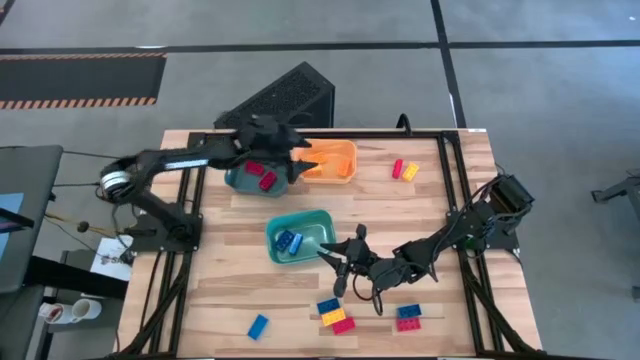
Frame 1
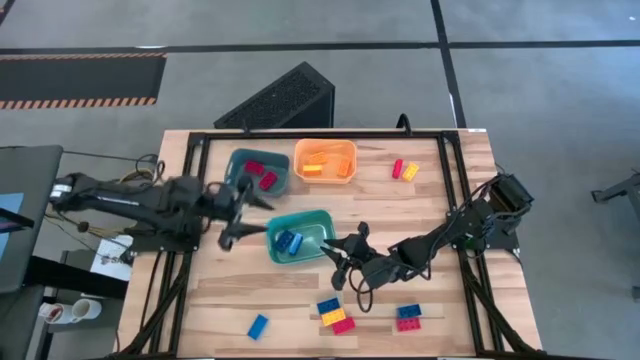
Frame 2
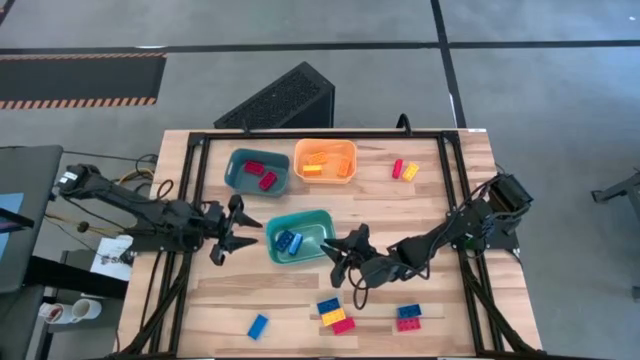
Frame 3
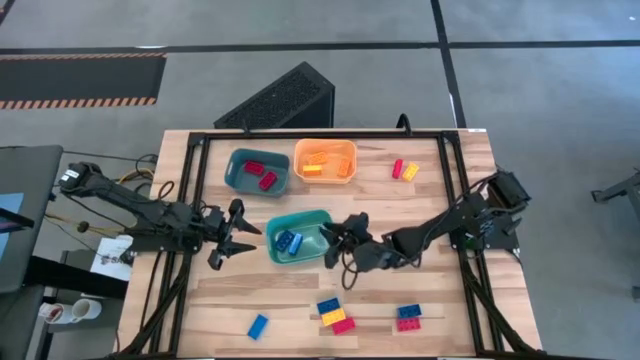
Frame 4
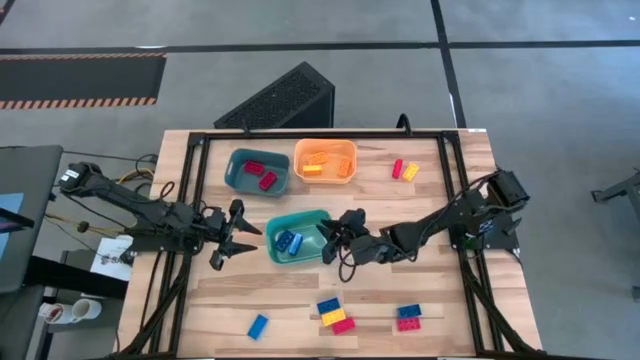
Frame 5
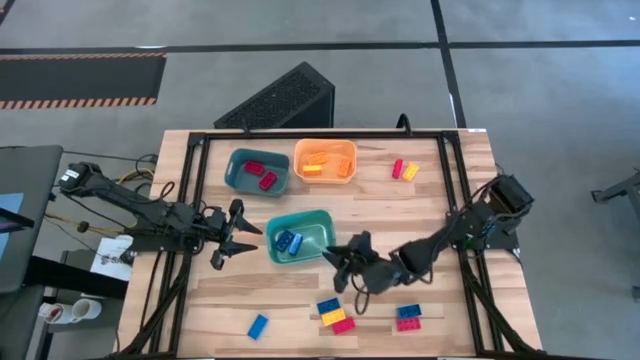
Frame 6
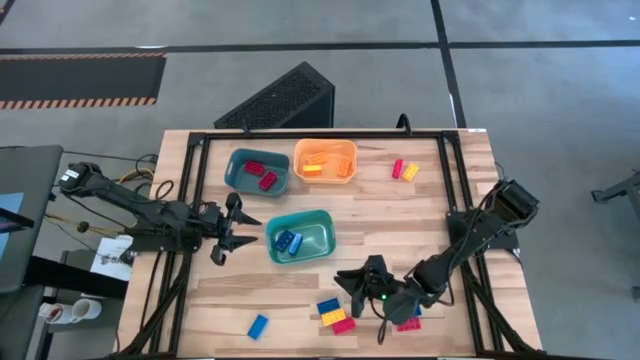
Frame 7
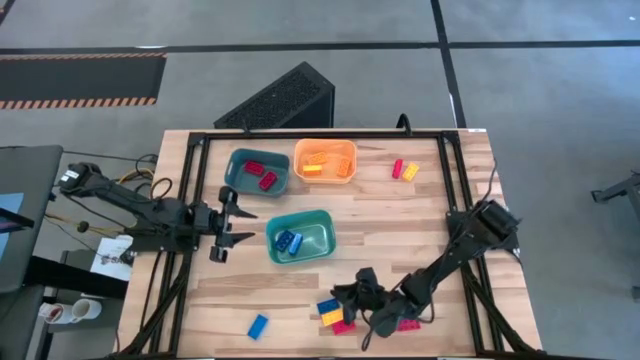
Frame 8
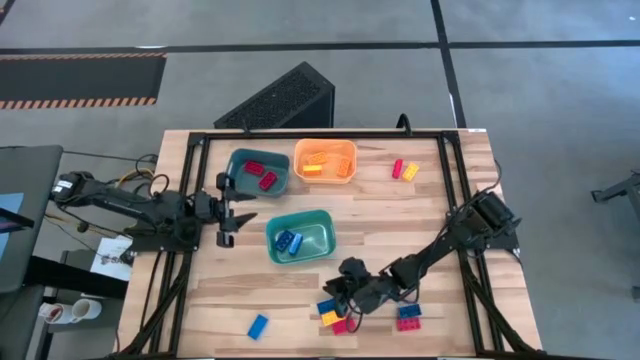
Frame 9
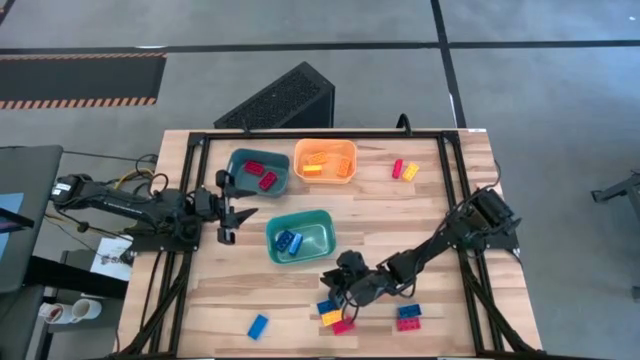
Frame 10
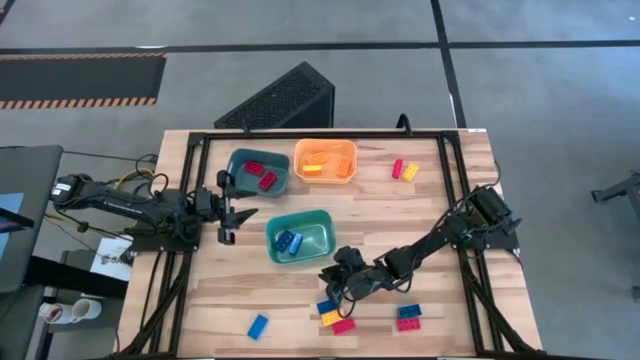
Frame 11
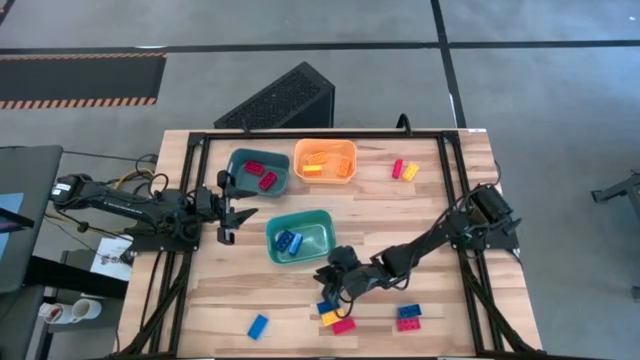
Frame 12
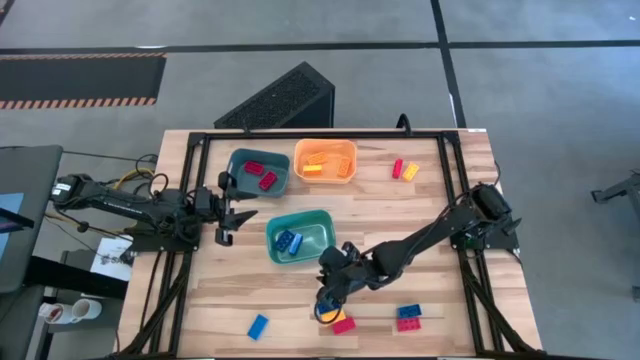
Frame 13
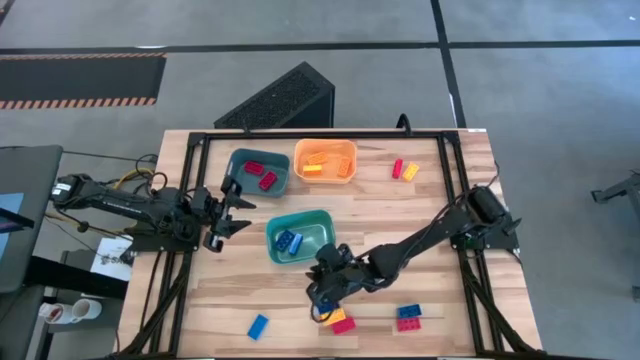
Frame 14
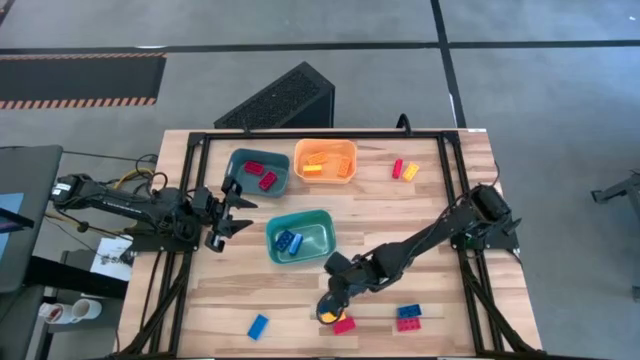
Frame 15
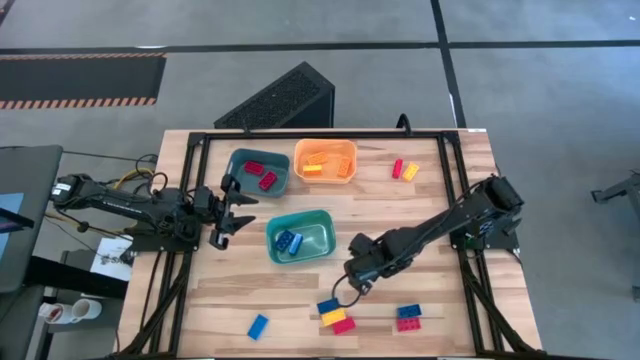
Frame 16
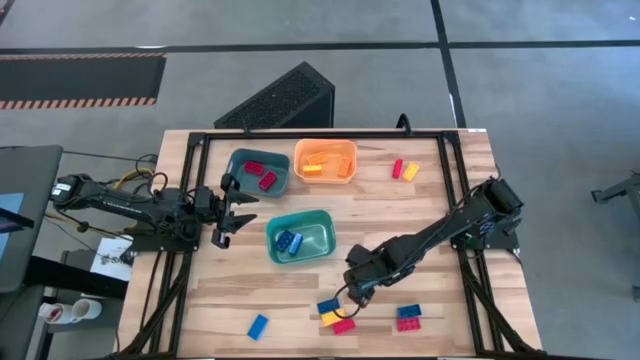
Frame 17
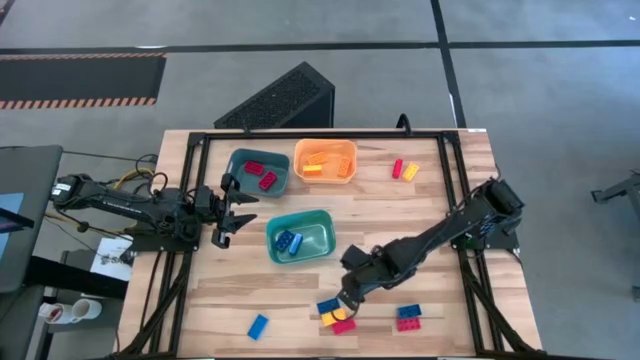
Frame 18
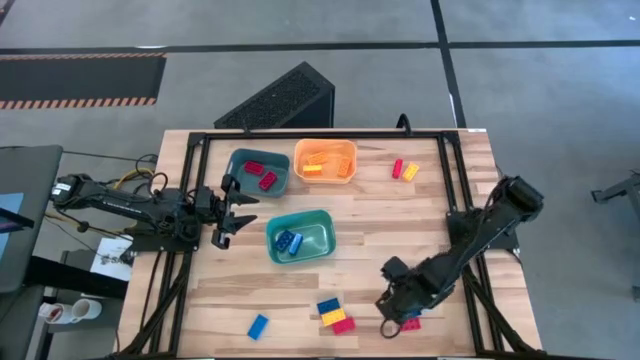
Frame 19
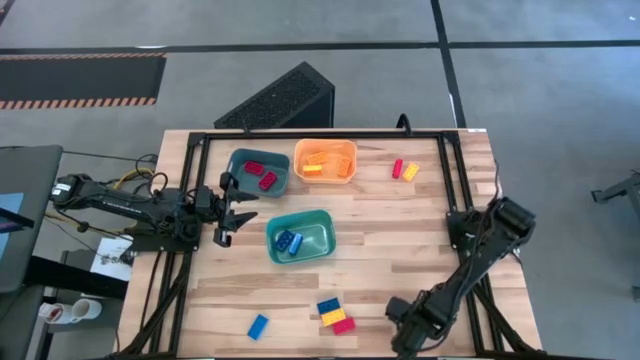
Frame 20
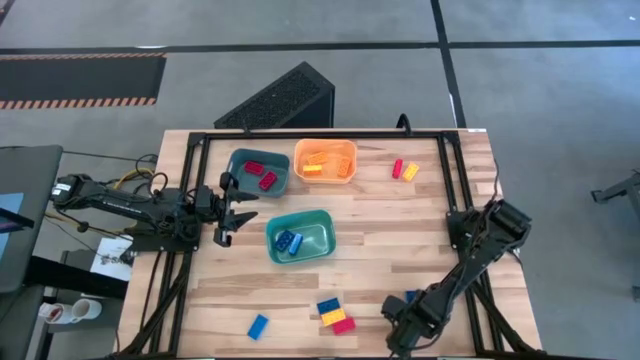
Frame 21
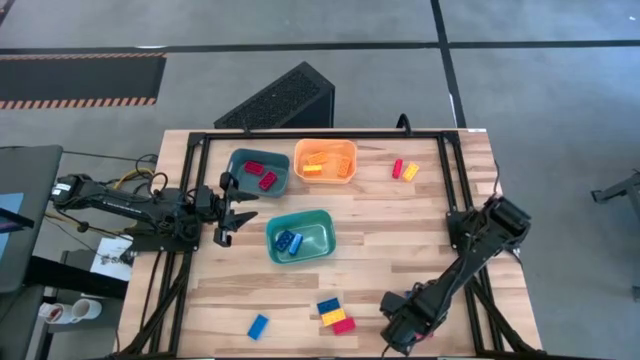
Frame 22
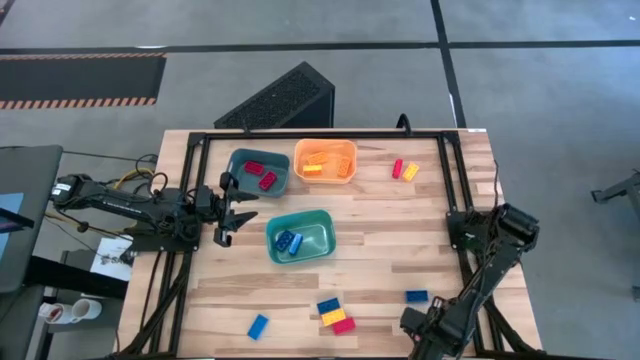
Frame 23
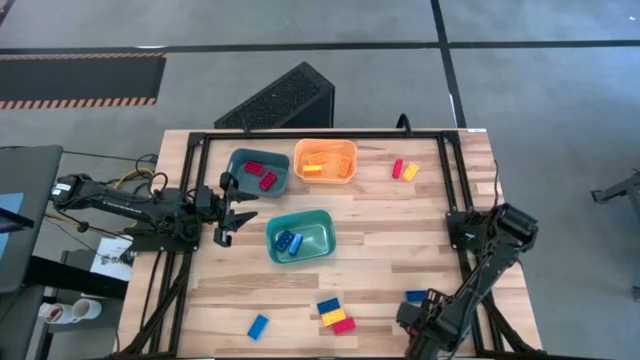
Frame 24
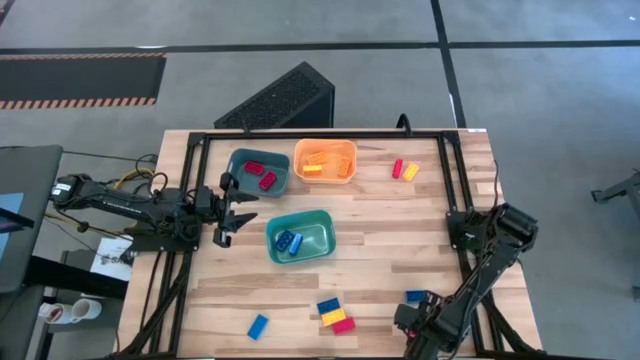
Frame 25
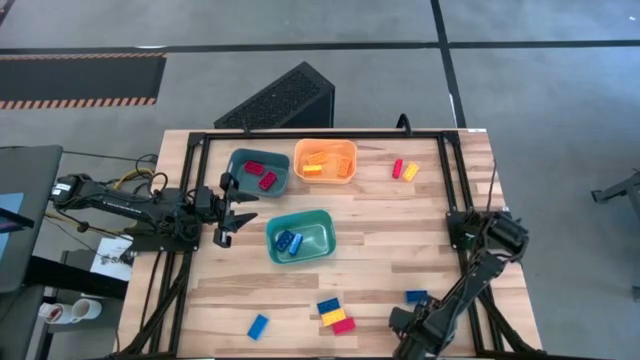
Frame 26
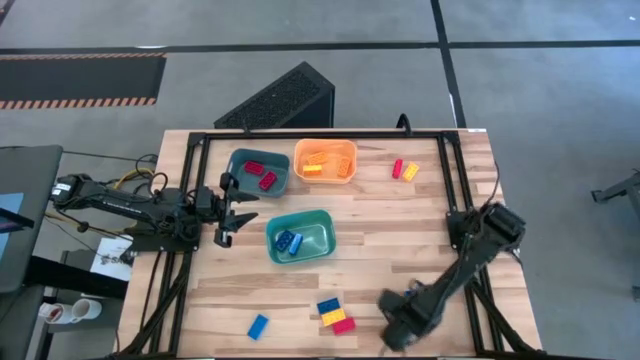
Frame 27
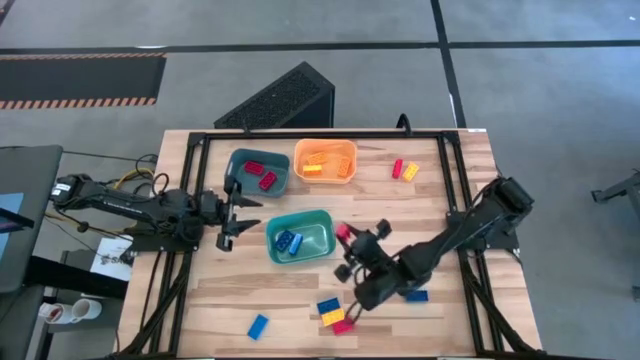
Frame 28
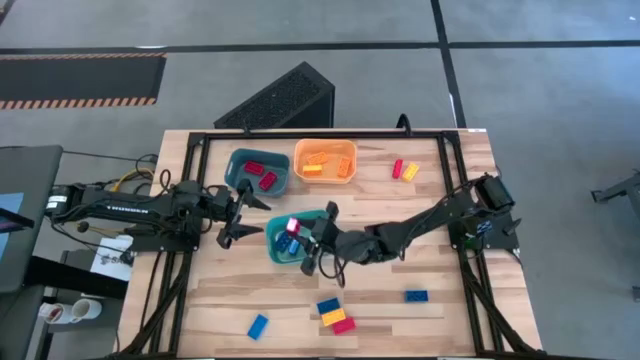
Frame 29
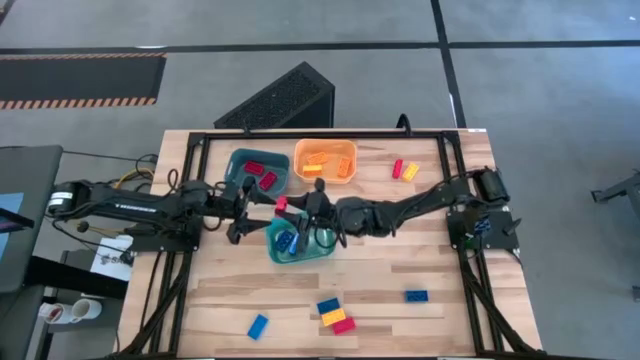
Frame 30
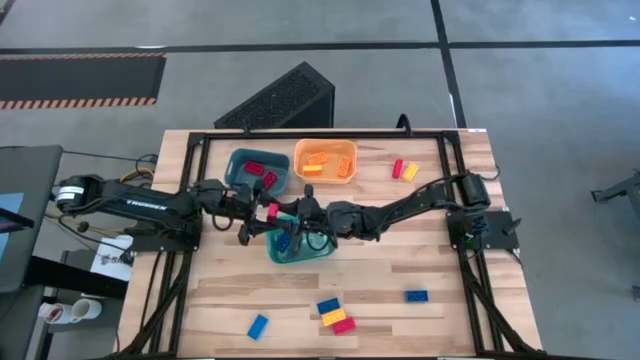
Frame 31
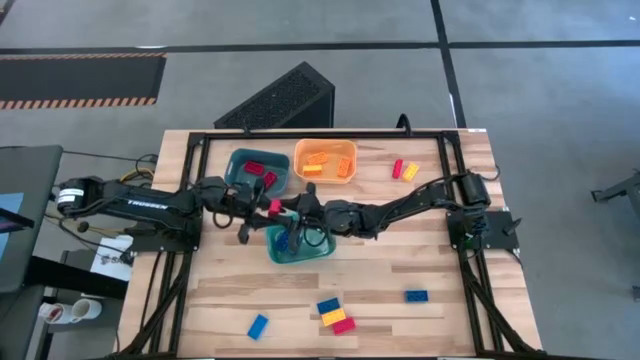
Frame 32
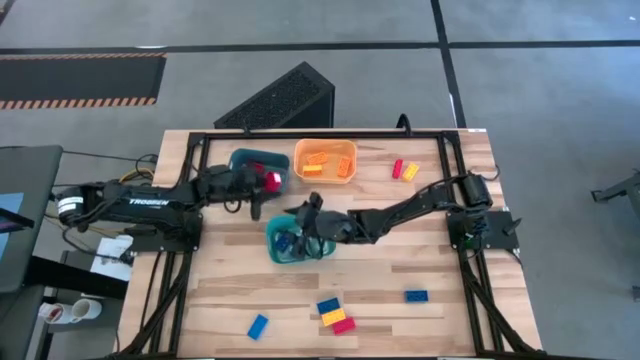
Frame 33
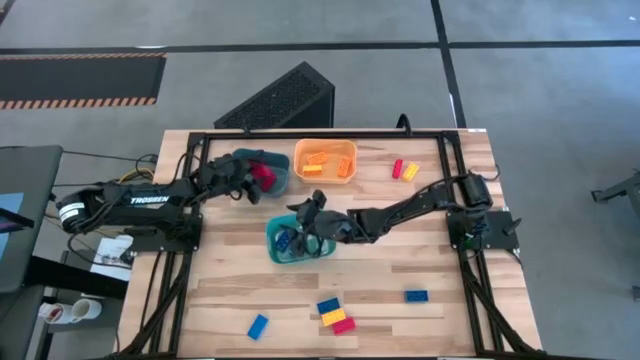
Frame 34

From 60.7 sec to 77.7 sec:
Task: Sort & place blocks by color
Put the red game piece into the blue bin

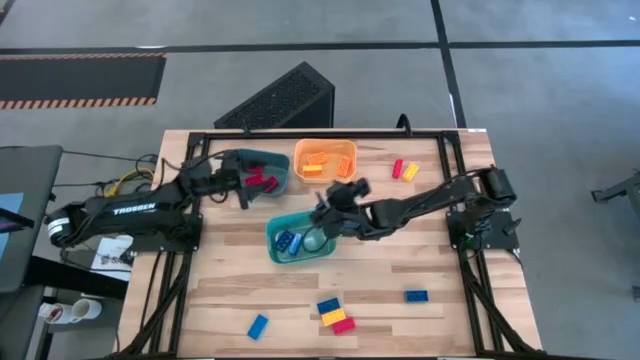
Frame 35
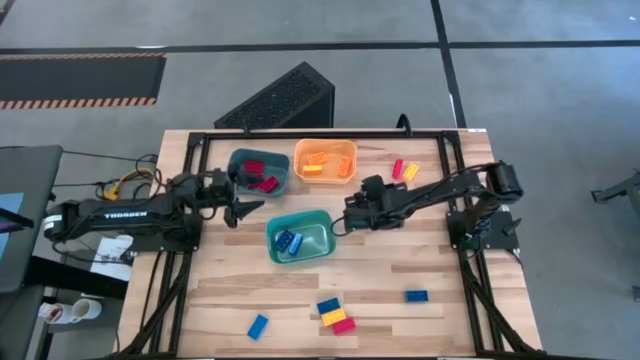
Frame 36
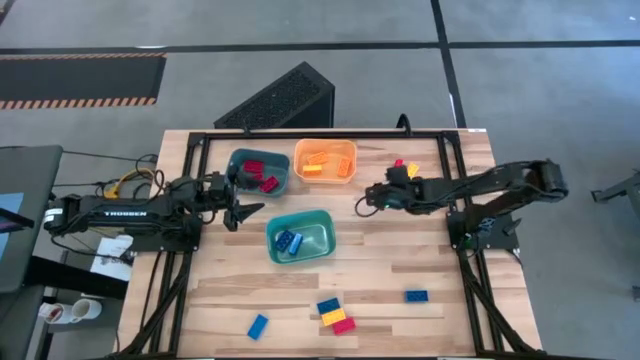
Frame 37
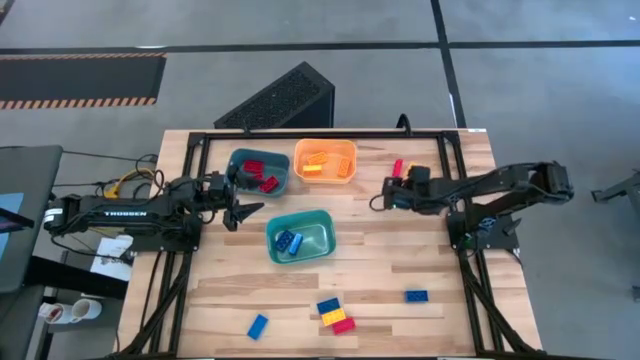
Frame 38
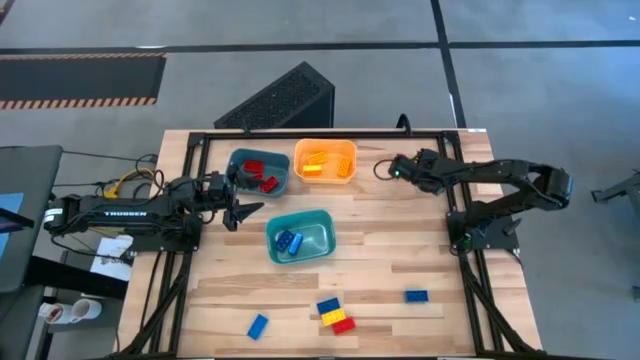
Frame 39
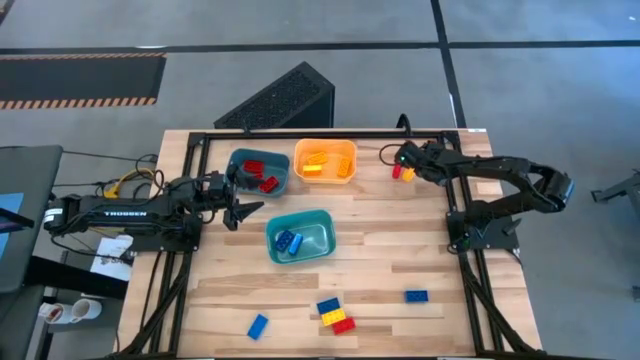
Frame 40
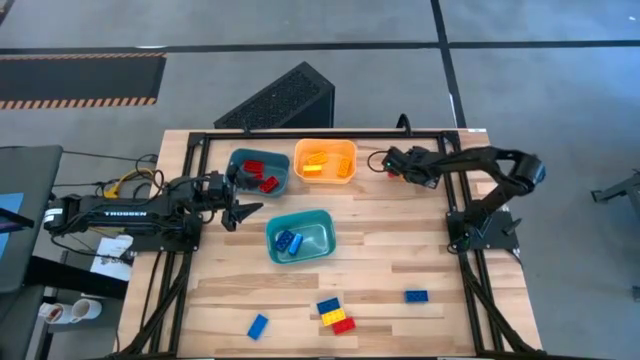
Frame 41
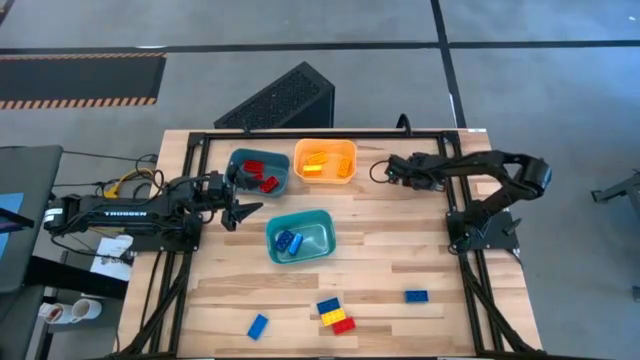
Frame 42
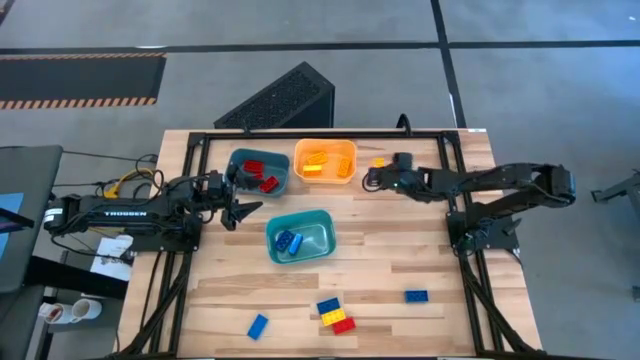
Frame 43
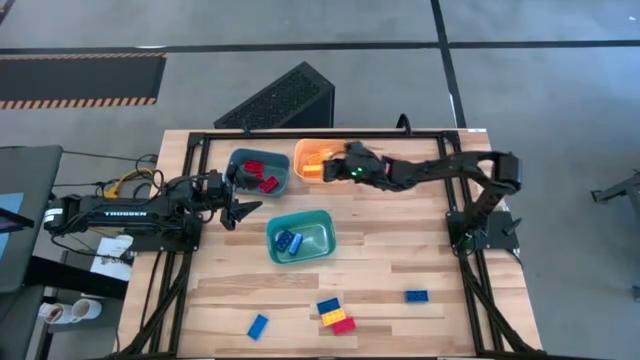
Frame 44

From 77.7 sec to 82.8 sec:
Put the yellow game piece into the orange bin
